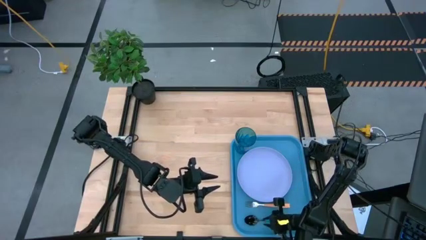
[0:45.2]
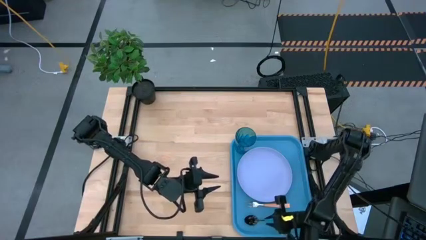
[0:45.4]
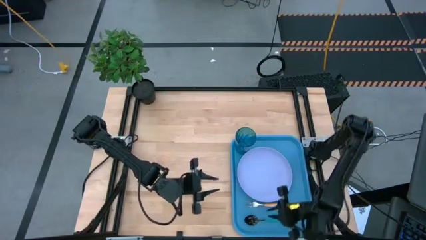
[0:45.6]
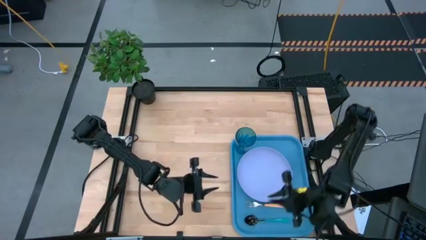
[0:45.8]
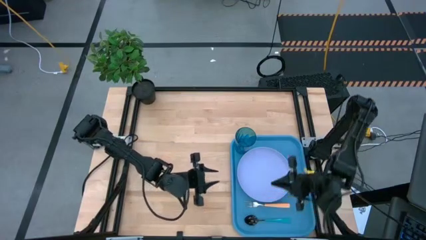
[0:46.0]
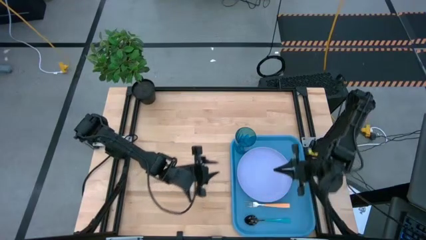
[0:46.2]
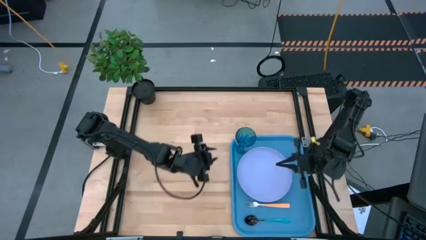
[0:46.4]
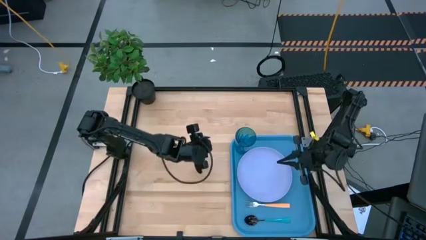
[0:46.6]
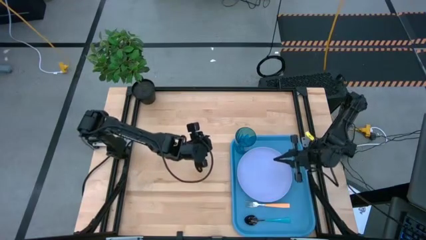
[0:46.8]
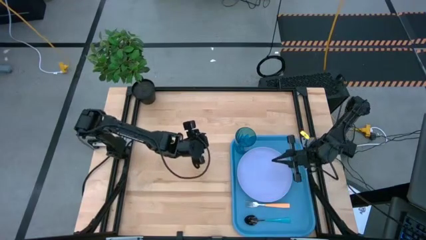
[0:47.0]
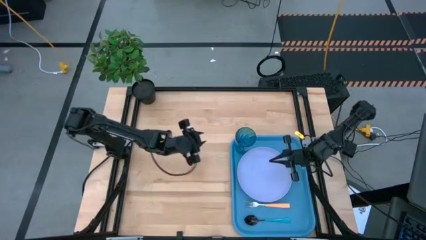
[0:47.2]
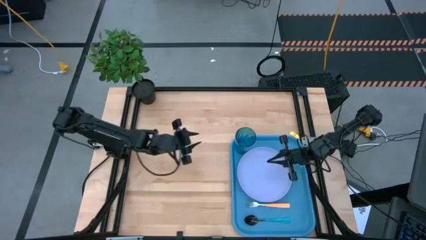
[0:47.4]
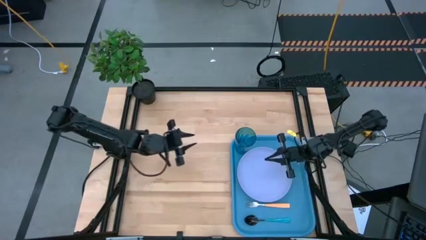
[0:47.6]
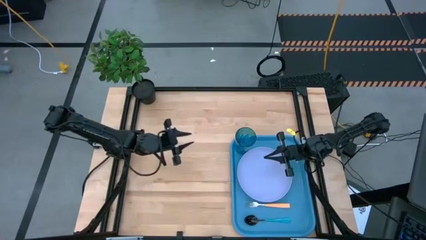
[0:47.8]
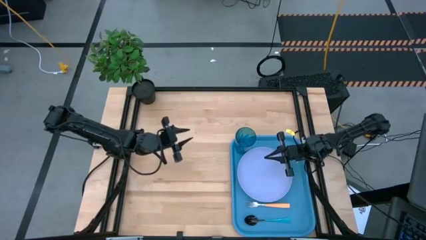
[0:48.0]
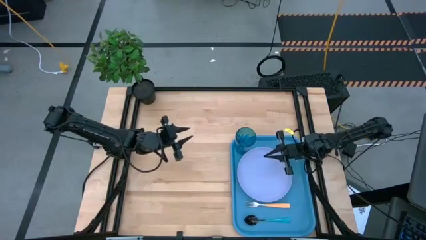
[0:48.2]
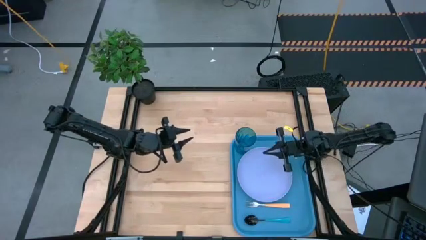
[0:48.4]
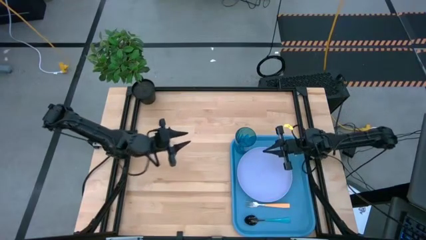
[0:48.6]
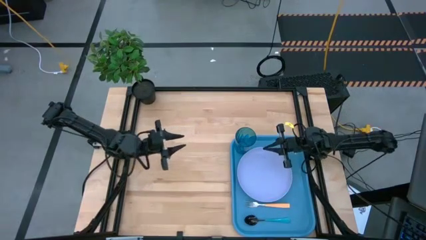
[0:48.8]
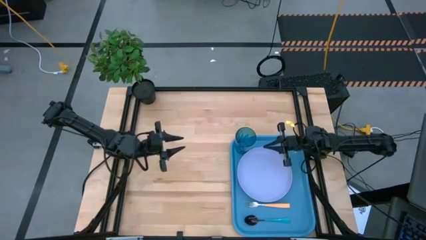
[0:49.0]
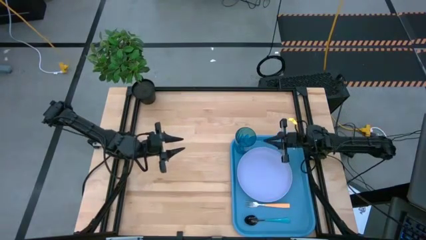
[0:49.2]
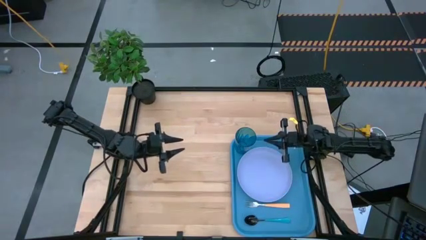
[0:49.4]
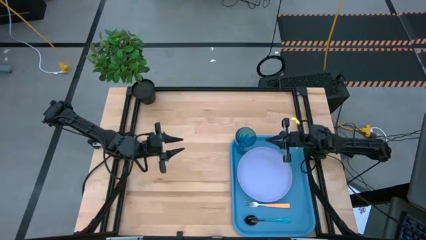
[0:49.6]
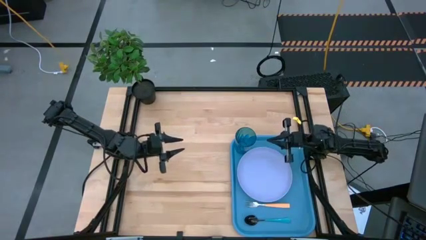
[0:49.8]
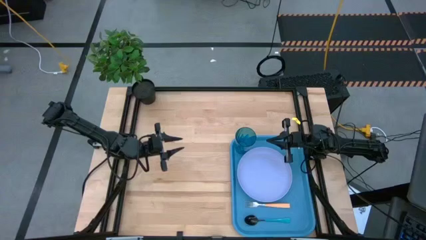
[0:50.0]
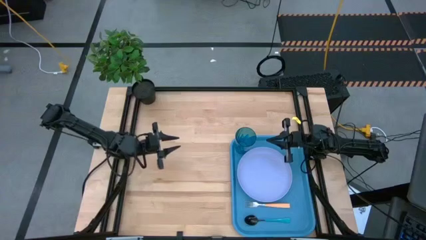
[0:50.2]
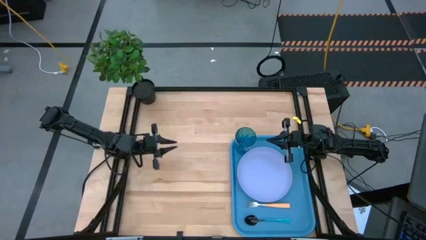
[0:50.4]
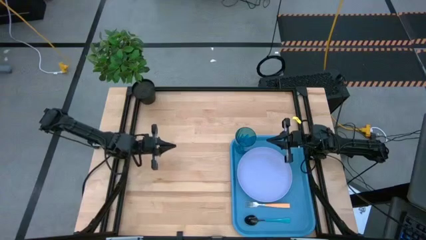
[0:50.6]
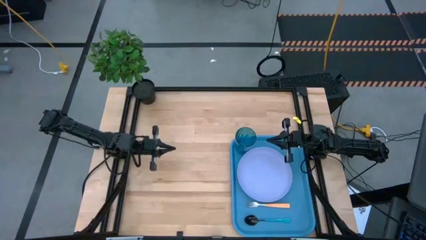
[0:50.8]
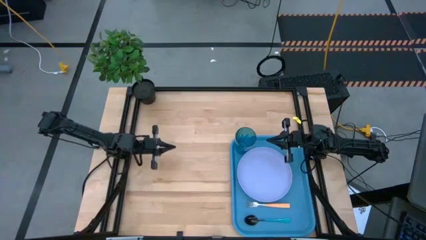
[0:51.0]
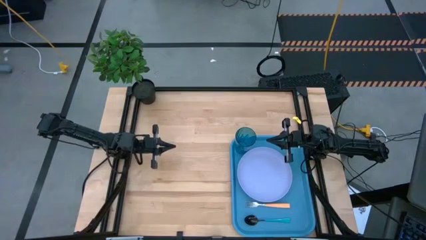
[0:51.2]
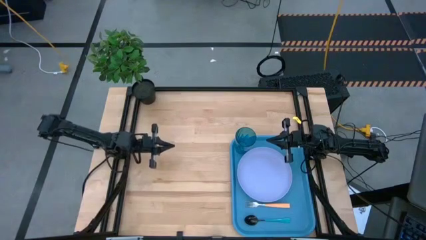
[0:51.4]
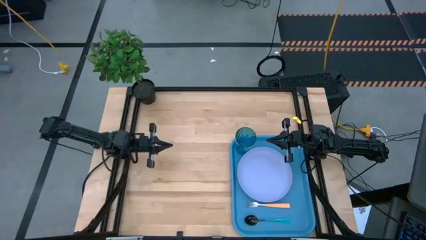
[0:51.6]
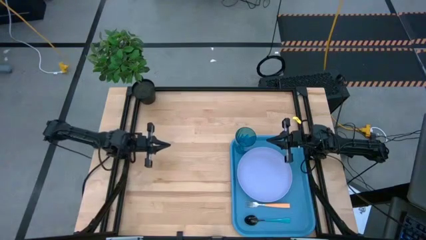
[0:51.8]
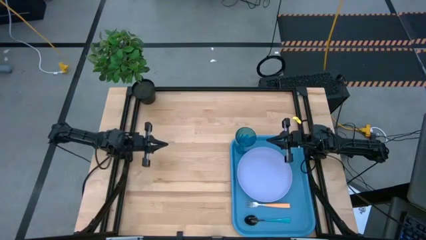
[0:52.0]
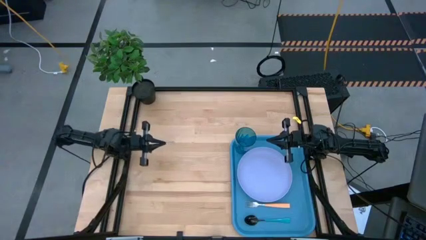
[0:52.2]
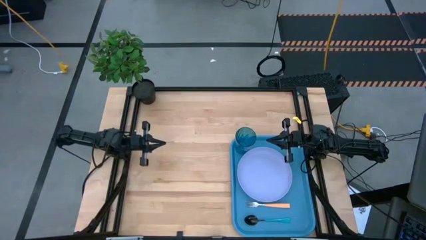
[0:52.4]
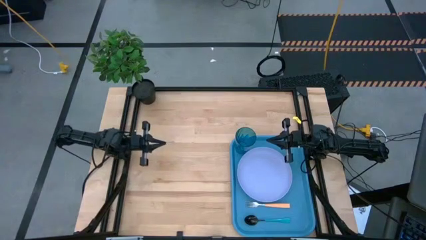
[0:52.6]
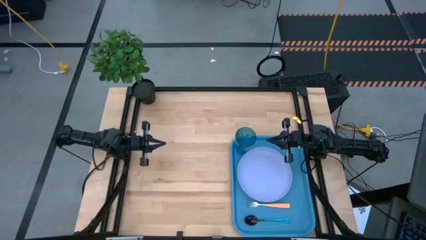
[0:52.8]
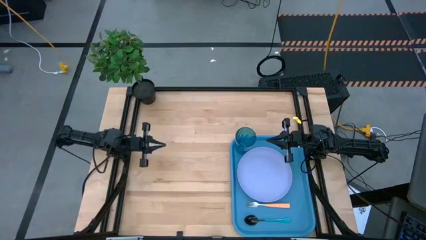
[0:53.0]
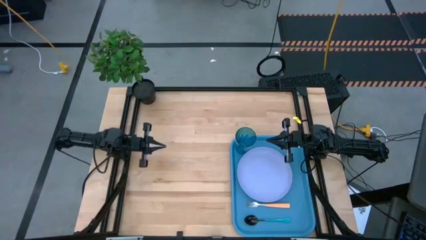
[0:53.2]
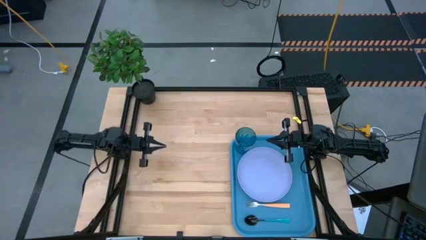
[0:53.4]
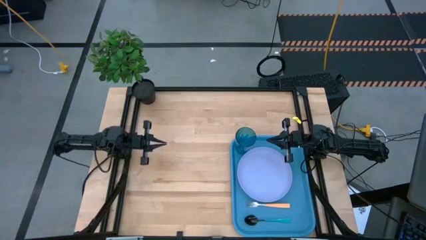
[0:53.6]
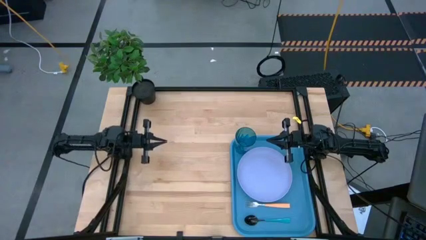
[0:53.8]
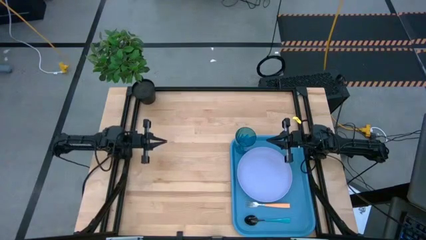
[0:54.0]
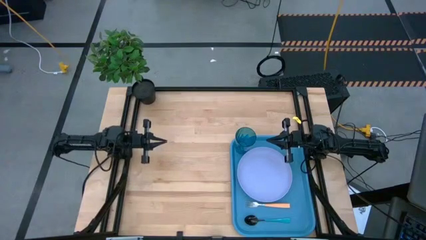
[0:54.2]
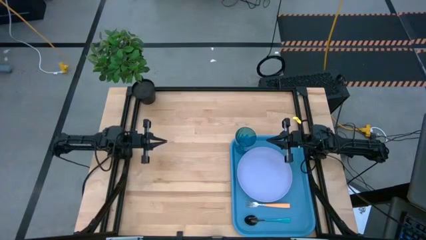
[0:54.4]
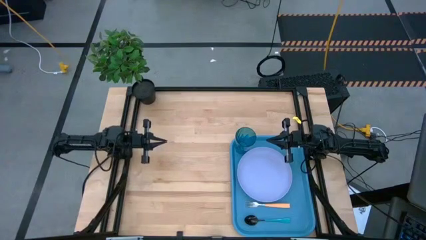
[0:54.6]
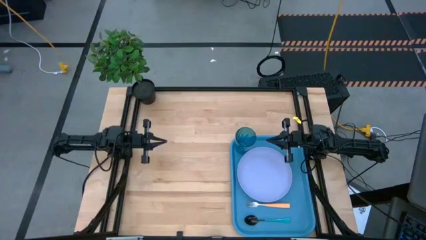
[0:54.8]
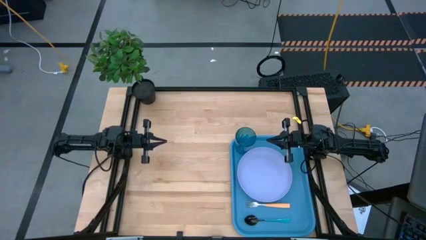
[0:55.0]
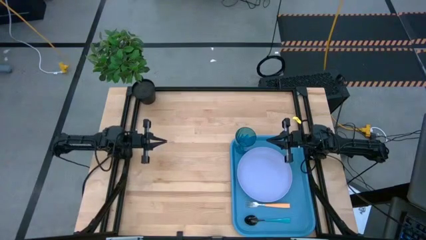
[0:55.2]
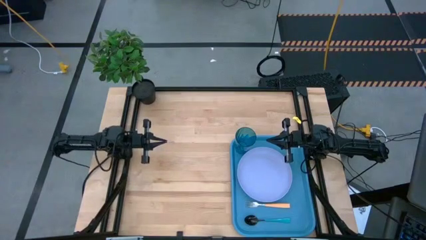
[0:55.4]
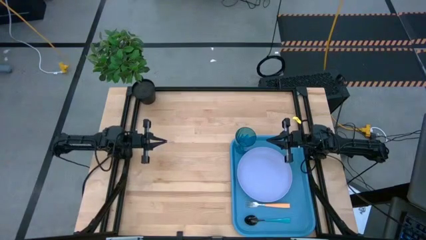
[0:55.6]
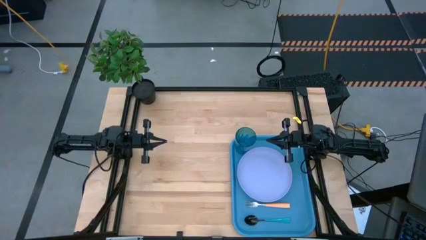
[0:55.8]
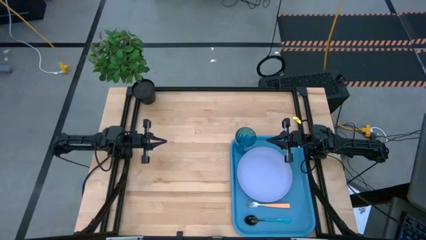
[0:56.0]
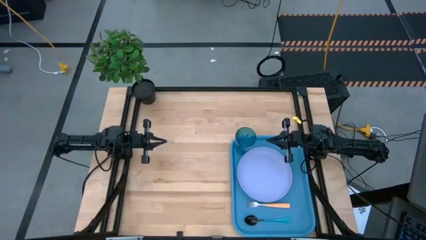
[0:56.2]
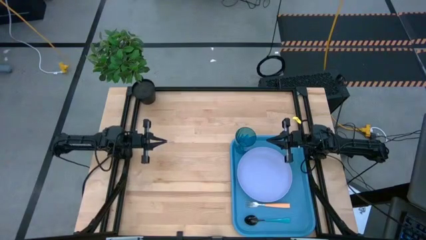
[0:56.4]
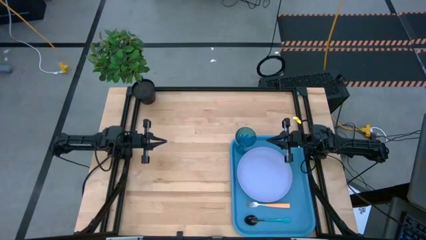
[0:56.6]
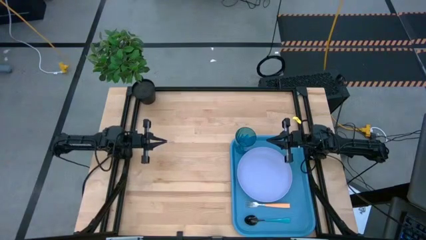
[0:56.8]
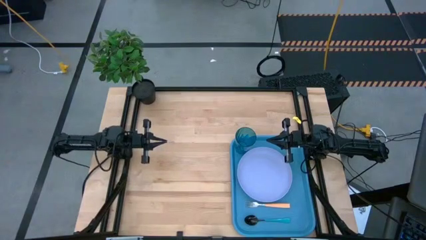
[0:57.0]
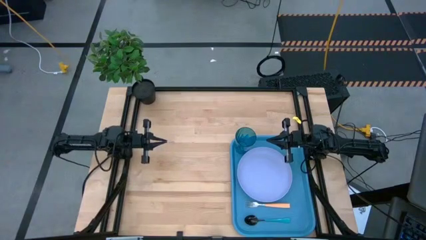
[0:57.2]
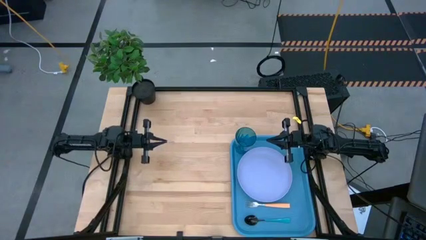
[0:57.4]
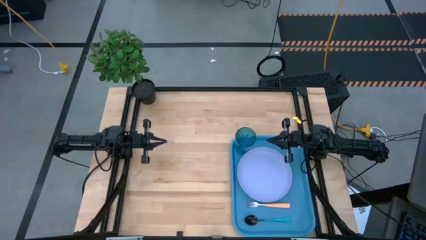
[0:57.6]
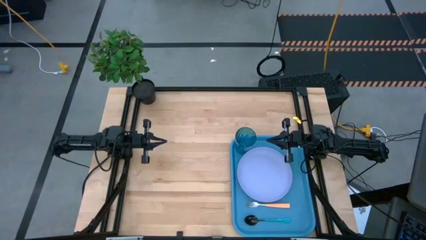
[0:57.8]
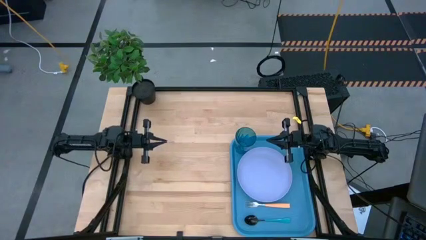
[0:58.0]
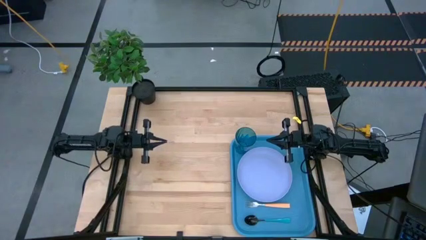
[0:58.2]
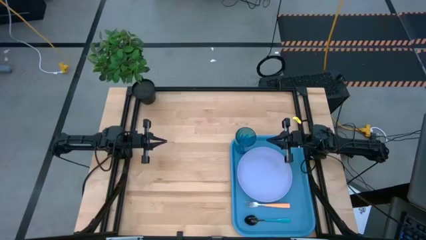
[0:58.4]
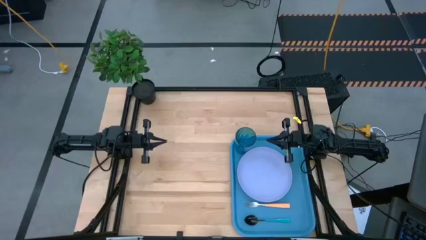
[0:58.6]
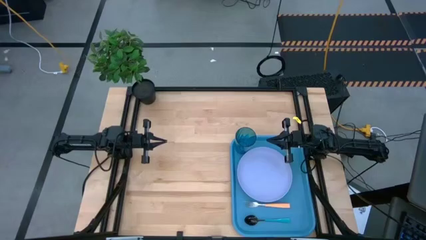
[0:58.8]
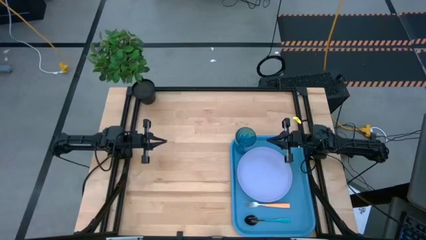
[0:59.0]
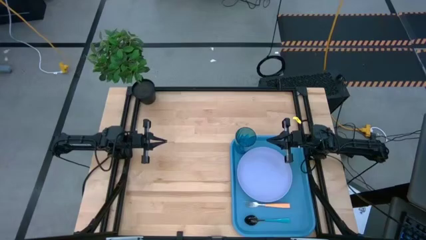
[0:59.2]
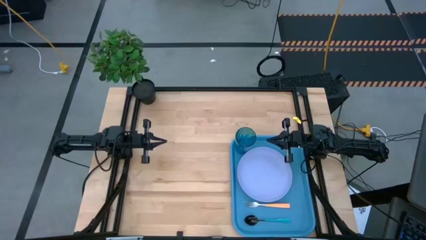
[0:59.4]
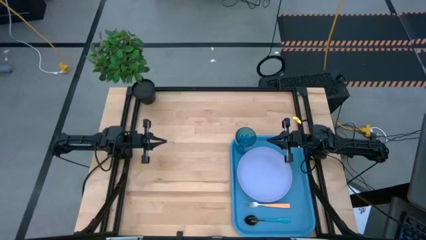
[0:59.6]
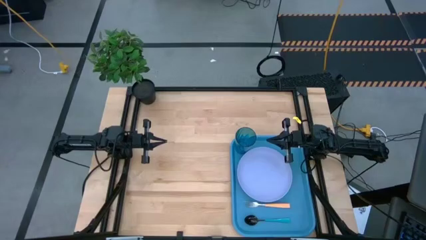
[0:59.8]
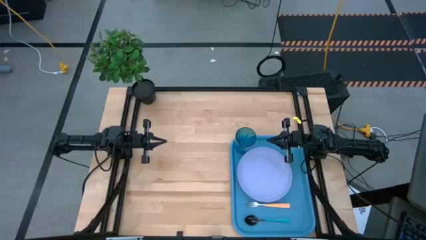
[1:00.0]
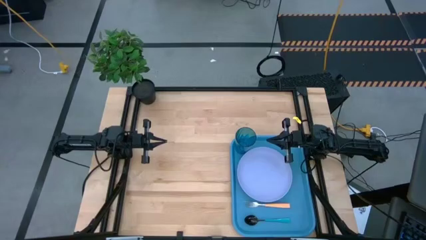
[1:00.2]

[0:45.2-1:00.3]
Task: Pick and place plate/cup/fork/spoon on tray
Return to Home Position
